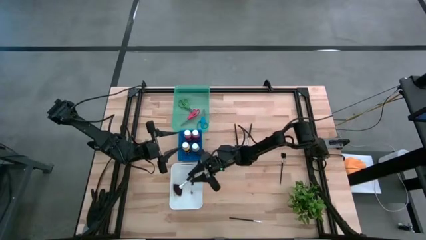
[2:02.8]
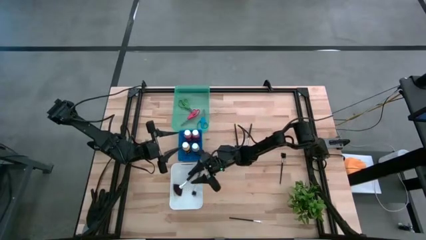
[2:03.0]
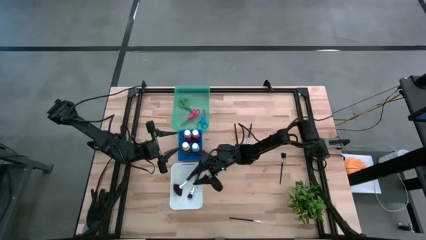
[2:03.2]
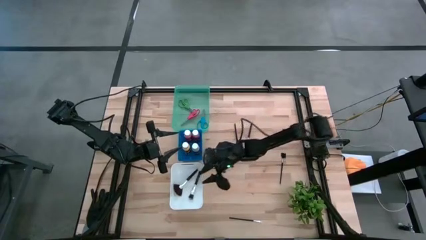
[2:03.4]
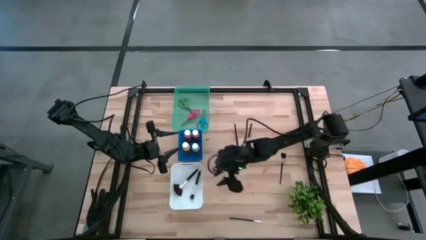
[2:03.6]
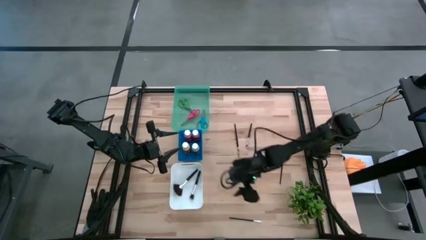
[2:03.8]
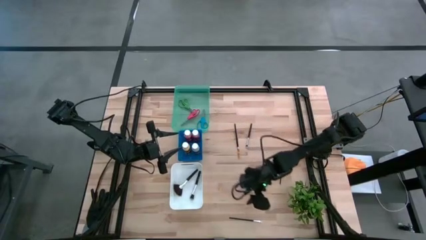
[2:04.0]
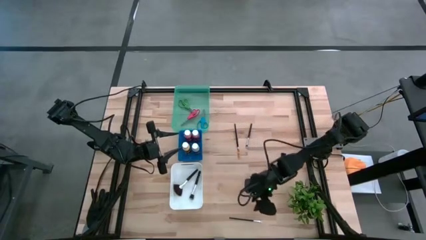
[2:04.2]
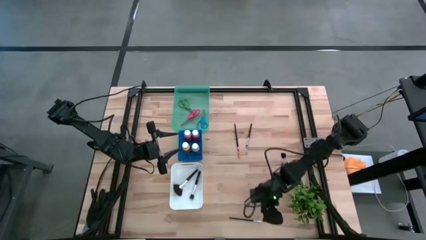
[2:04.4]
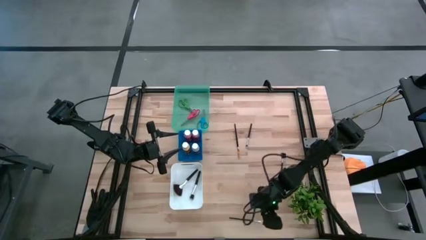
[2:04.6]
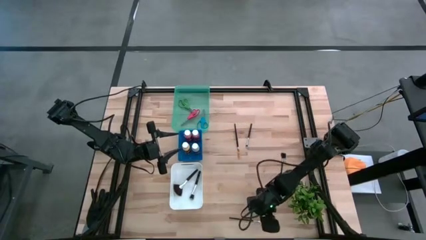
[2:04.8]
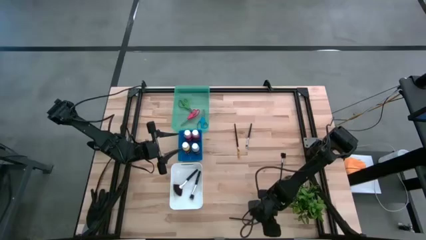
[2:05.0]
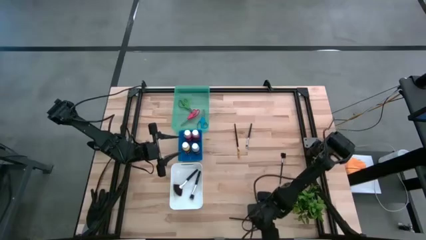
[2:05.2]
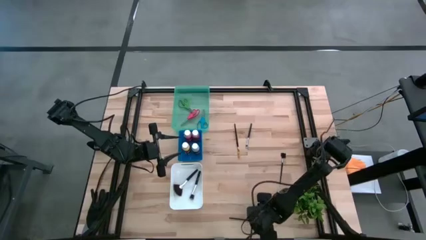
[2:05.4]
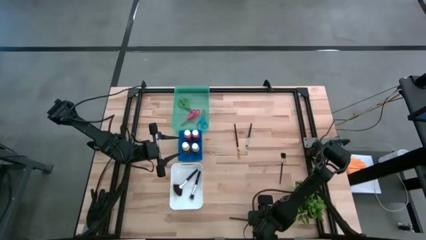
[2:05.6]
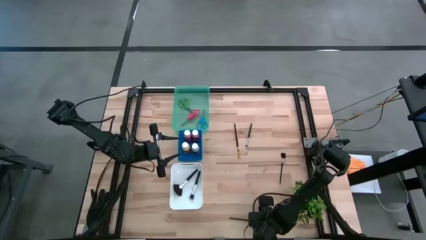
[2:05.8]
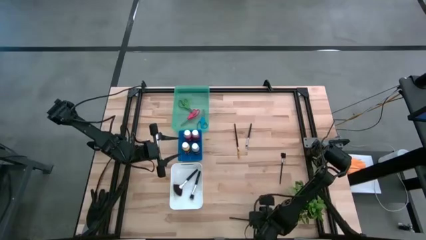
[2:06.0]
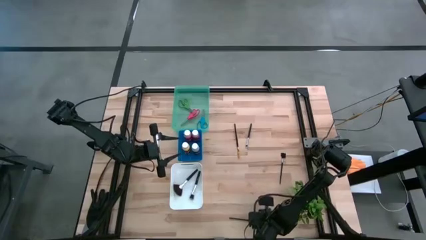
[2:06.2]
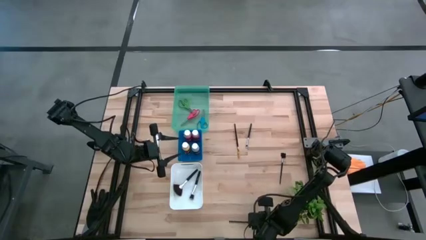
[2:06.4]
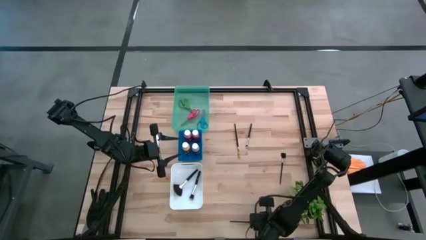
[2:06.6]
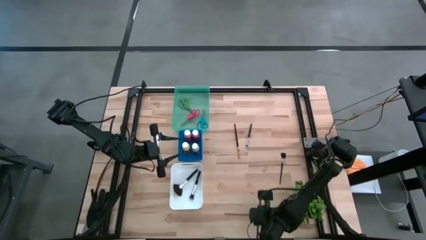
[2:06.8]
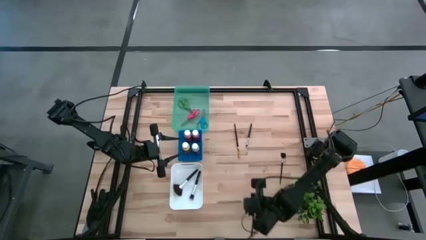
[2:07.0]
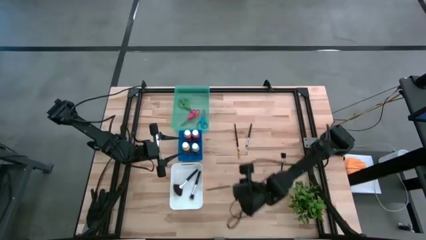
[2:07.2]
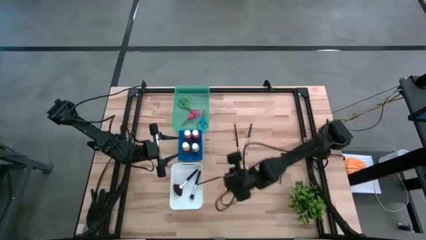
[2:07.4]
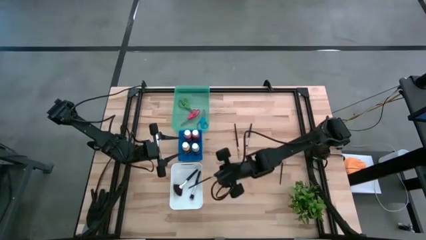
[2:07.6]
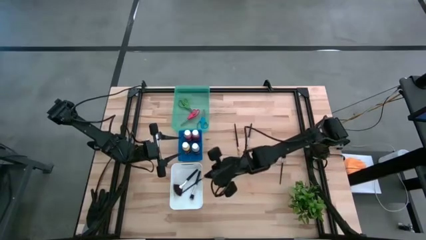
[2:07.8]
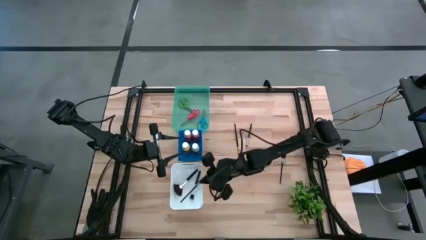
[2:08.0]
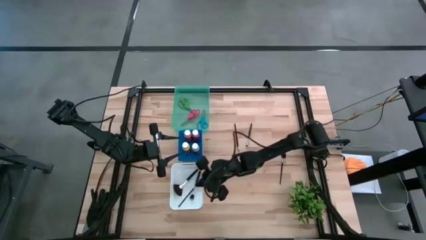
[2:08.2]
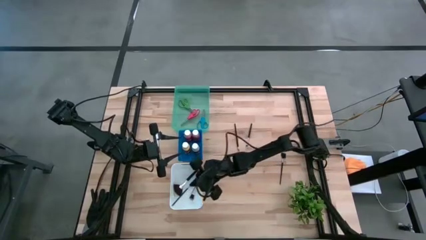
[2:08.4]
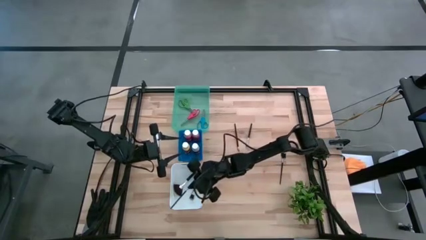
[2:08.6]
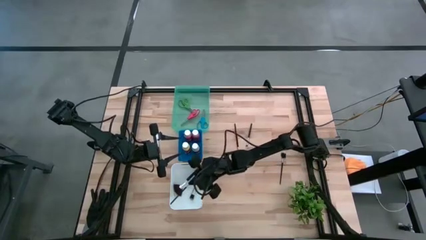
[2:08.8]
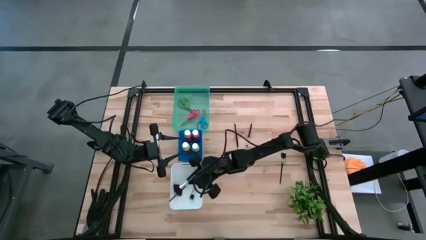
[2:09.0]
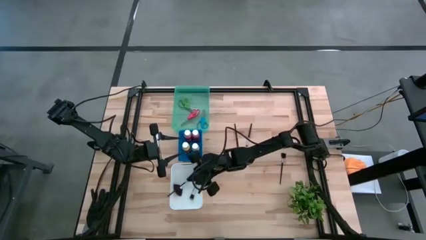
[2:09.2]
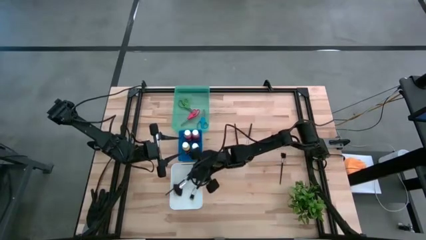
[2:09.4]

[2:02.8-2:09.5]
Task: Pick & Place Paint Supplies
Put the white eyeshadow brush into the white bin

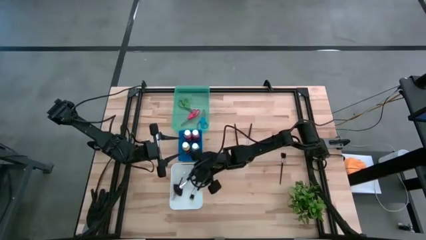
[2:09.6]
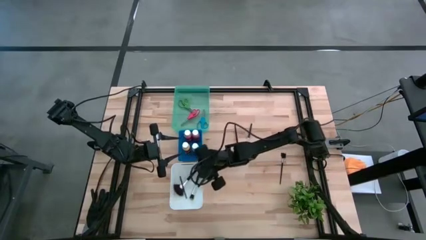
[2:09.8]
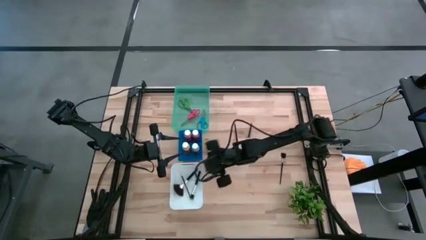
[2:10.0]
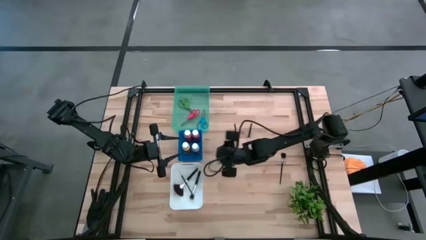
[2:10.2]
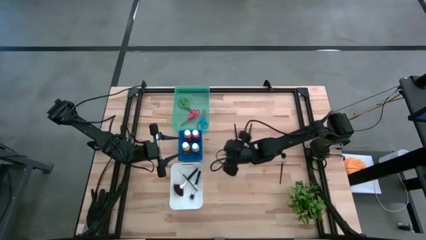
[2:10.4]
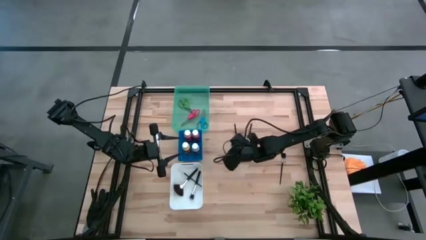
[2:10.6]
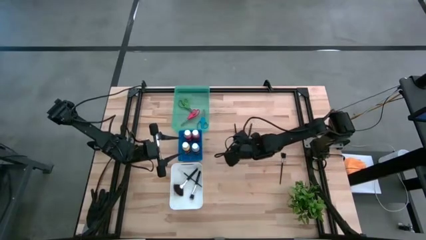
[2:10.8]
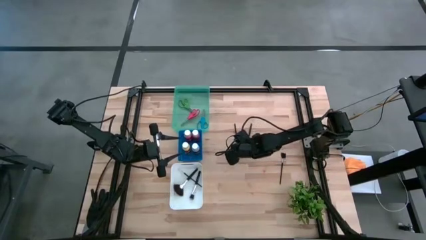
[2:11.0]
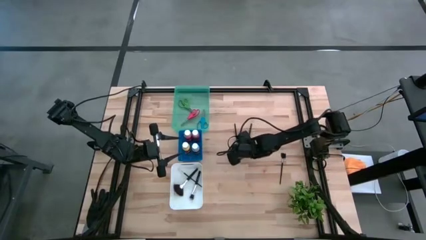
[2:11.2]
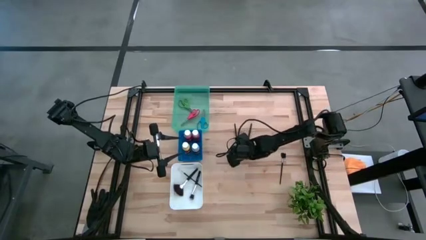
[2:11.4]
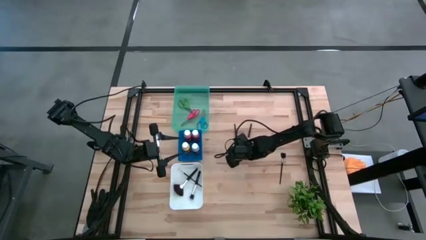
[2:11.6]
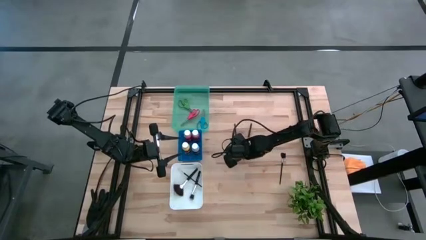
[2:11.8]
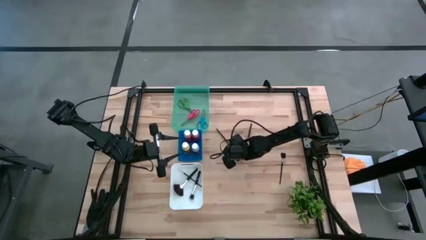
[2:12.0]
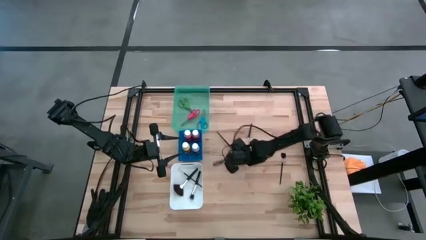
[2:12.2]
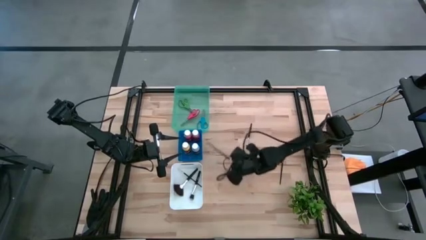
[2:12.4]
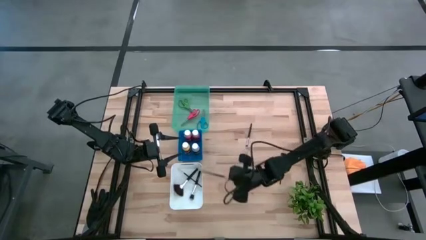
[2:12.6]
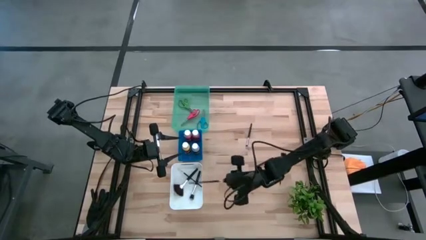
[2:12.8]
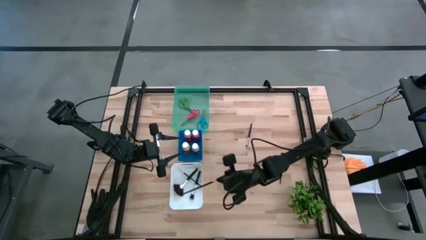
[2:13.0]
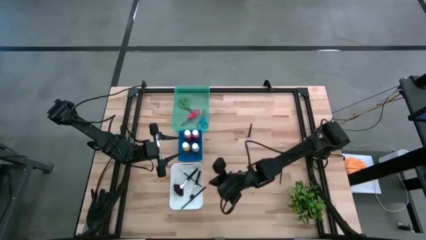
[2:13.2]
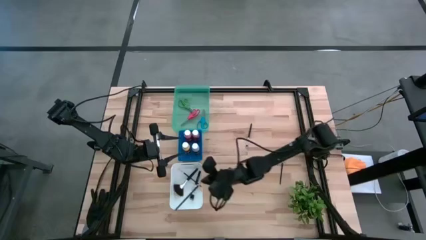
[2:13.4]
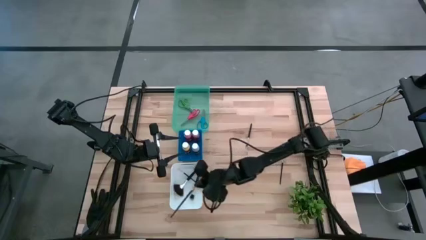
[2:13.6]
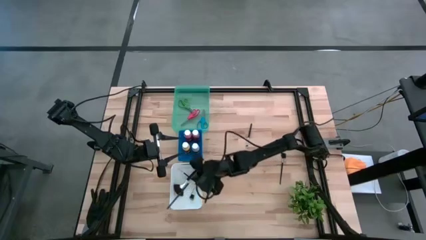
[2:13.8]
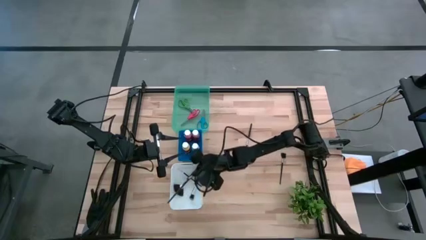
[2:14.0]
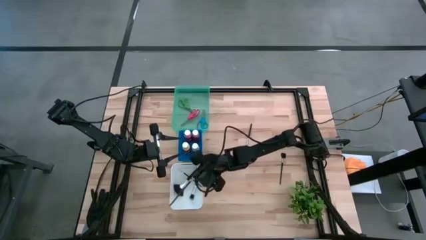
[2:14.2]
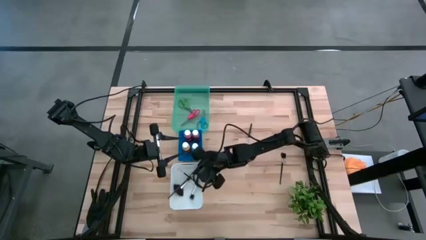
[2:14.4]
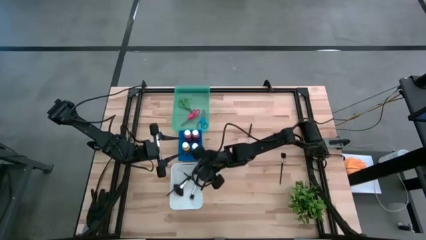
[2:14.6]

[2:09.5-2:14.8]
Put the black paint brush into the white bin

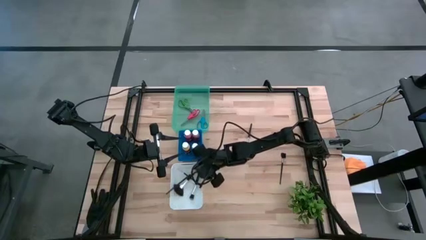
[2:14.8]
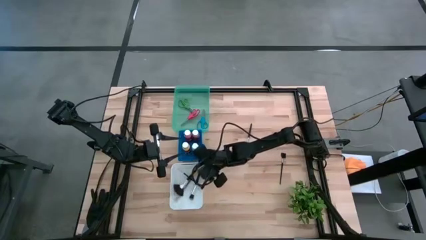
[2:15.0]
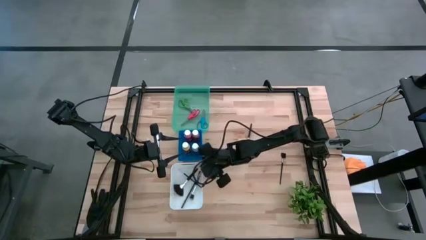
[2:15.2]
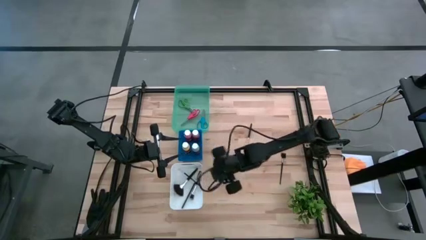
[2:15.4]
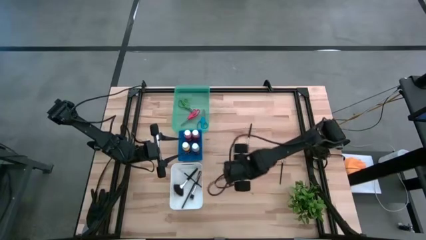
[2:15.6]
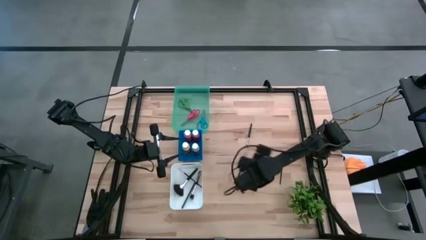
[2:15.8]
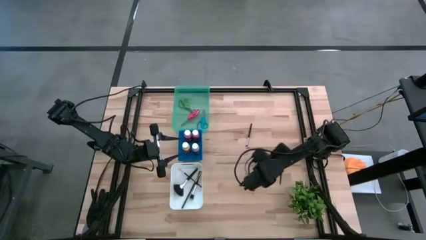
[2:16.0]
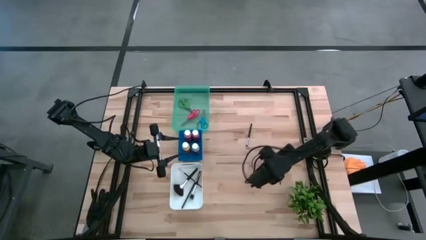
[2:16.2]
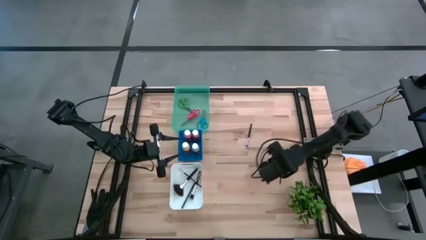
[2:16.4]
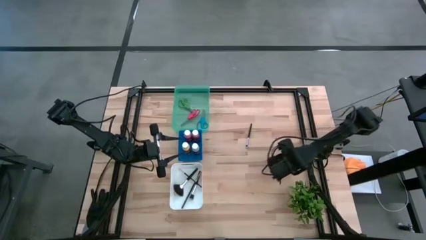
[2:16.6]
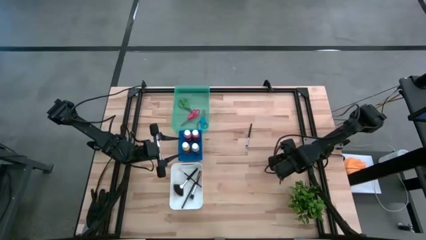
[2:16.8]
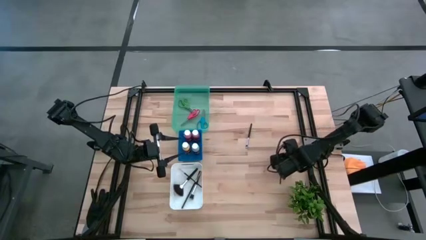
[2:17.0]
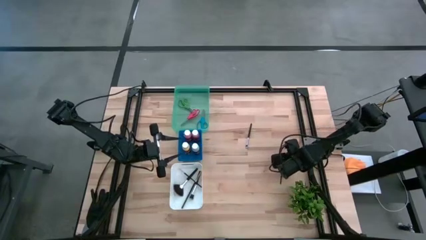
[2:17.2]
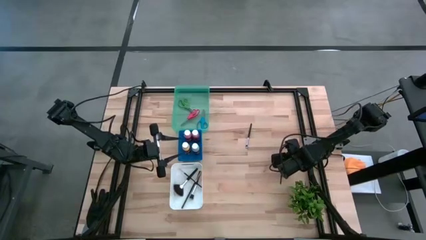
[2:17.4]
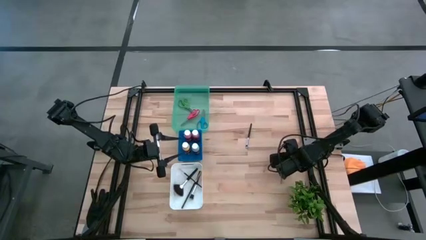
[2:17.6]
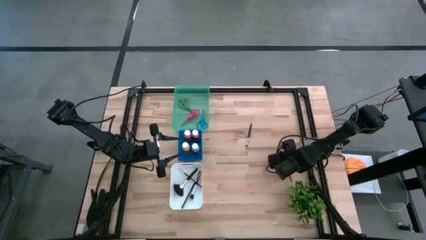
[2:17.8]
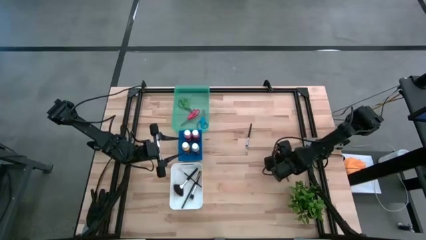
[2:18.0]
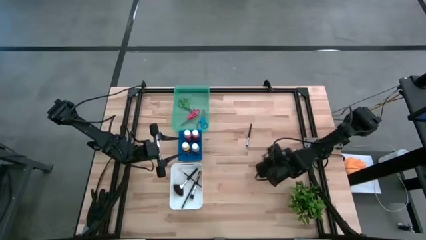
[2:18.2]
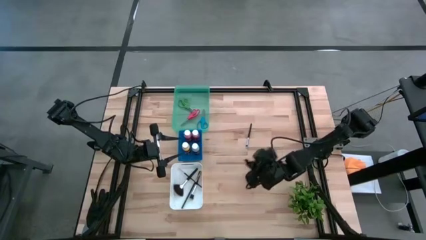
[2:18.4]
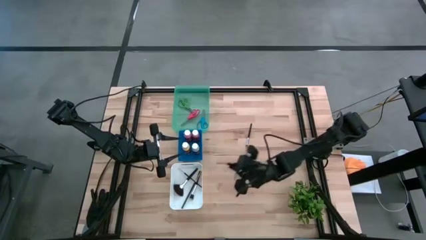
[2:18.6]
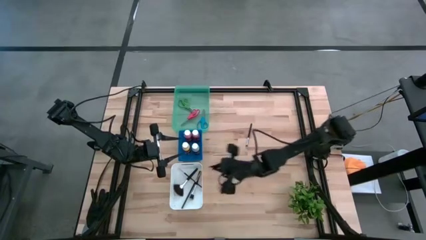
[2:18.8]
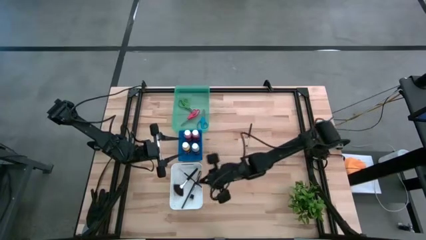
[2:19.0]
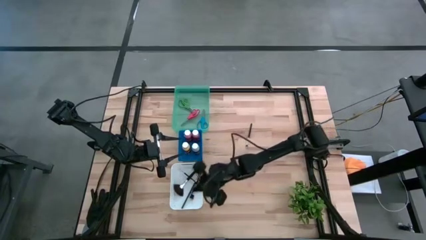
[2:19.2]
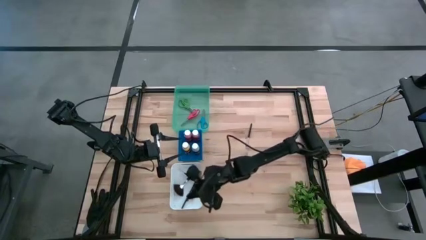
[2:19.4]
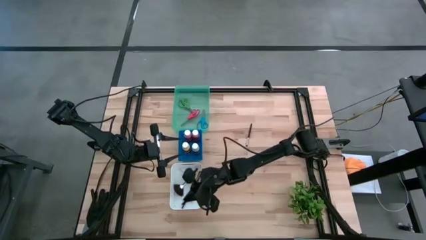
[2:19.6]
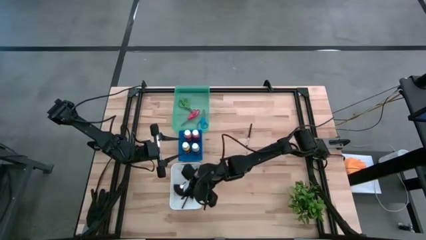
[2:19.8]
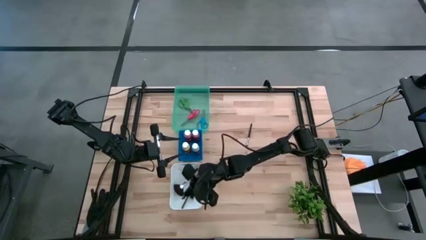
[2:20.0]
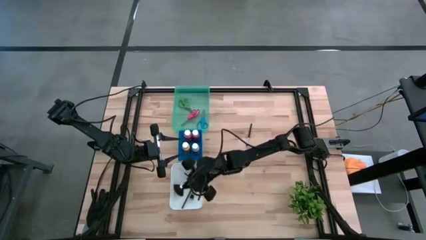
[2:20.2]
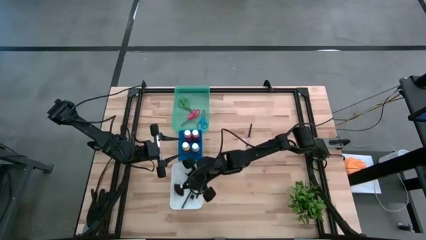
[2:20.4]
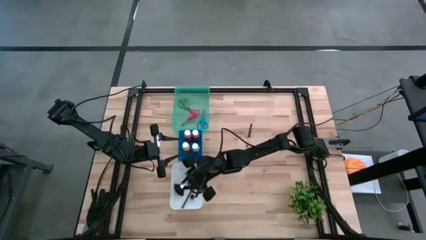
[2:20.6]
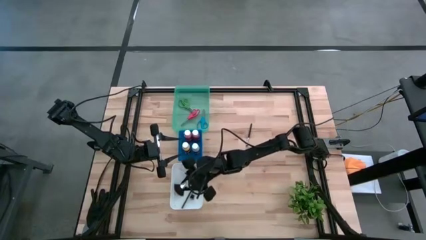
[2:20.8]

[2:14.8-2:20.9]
Put the black brow brush into the white bin
